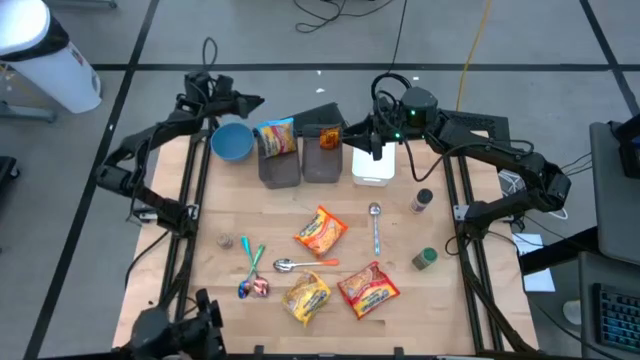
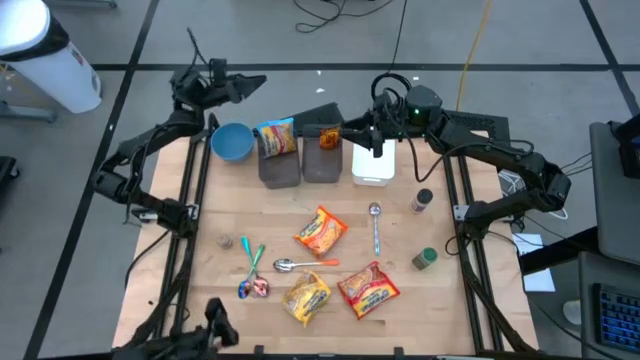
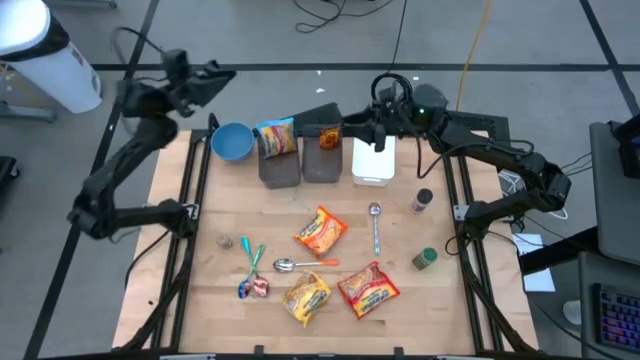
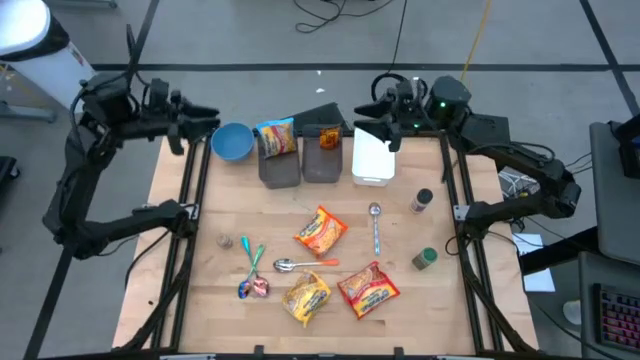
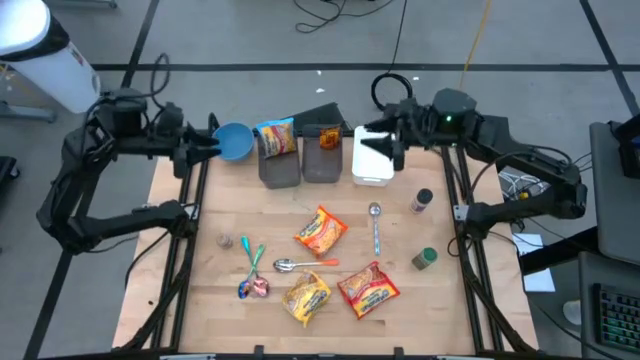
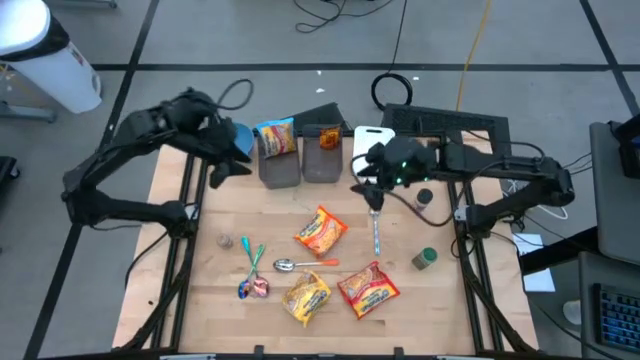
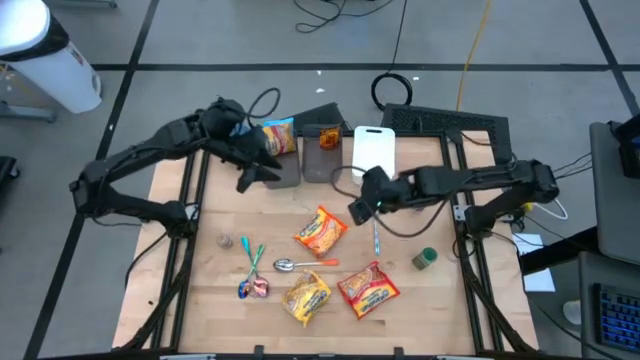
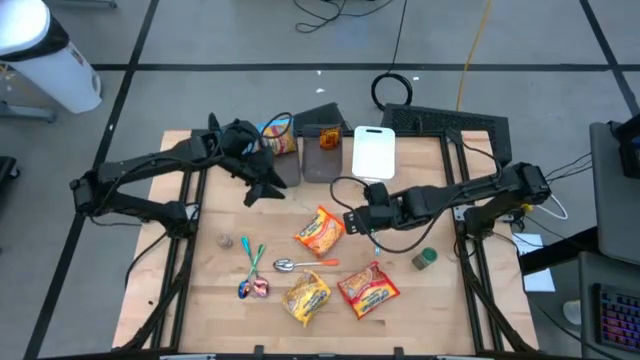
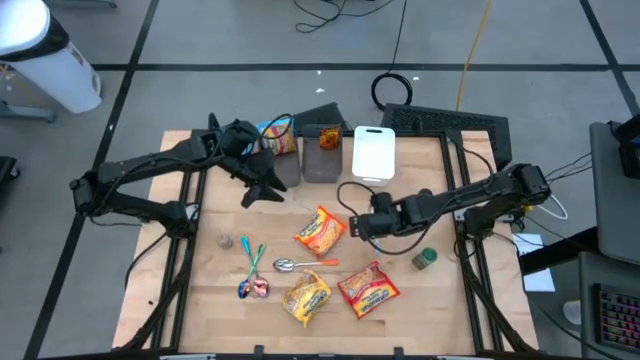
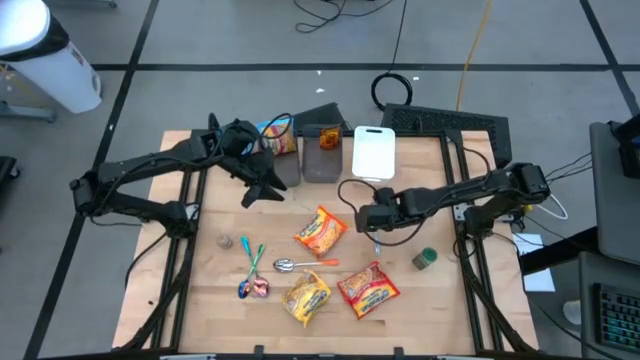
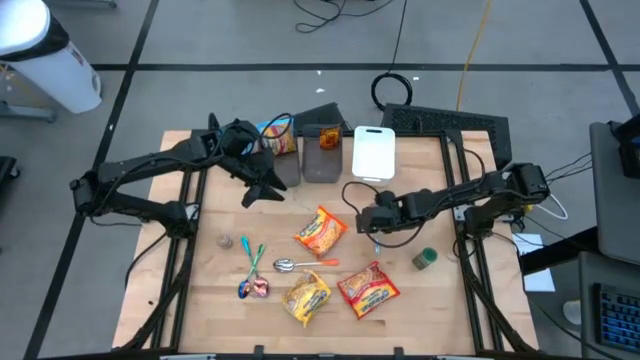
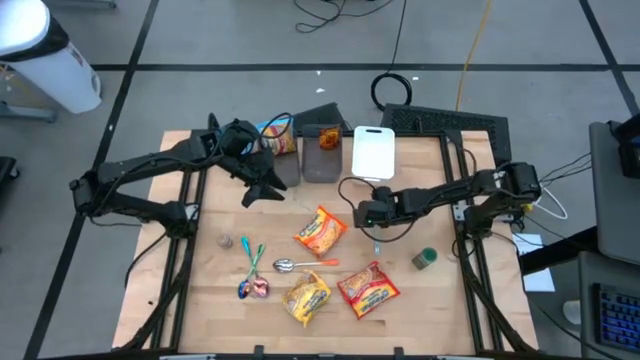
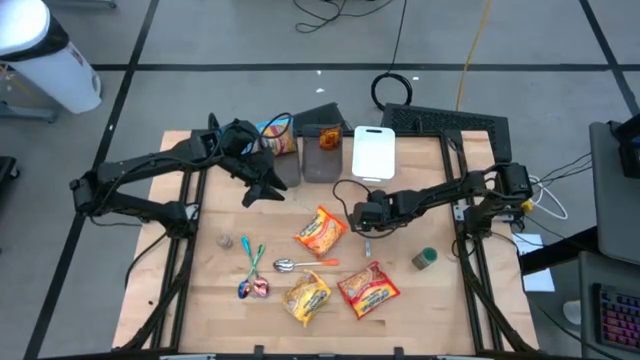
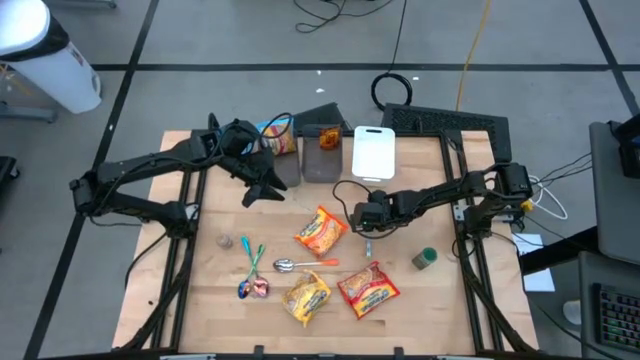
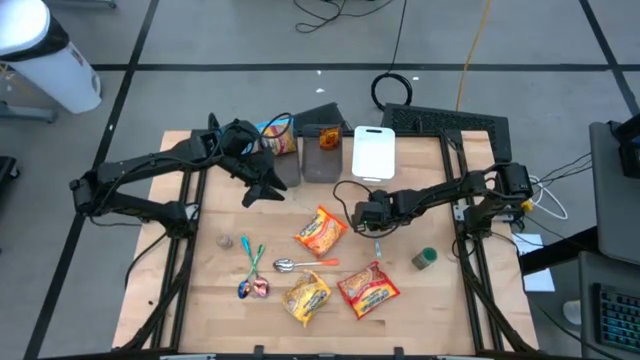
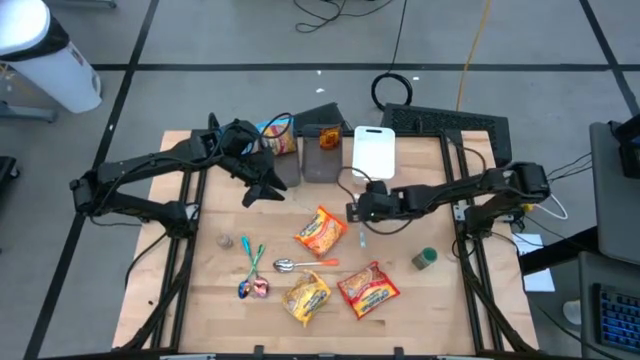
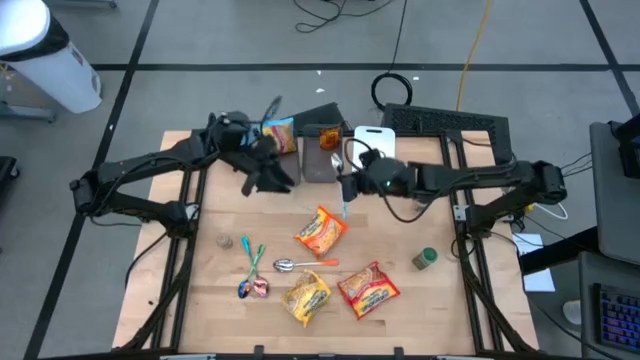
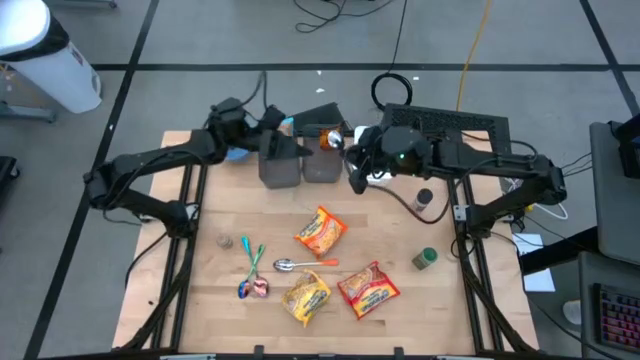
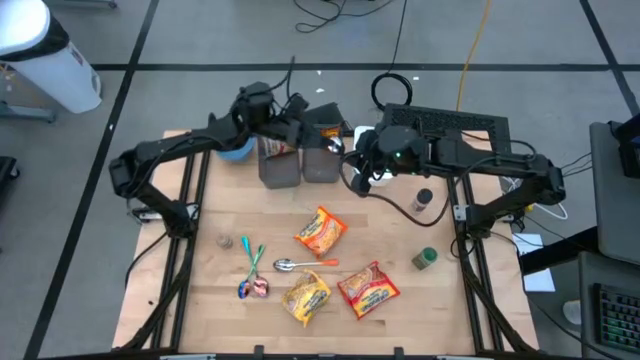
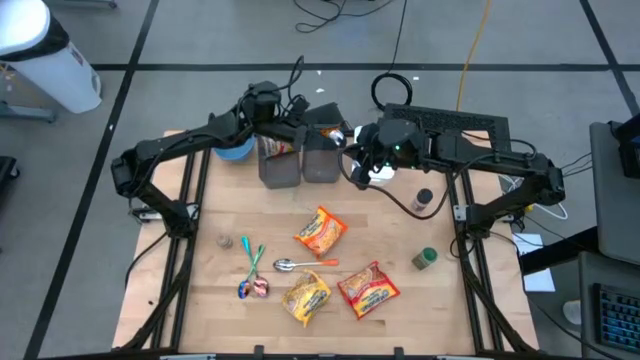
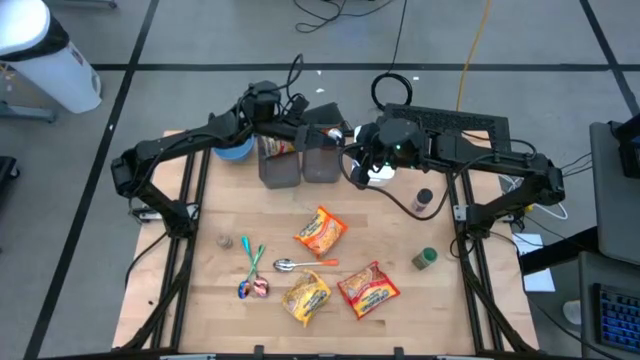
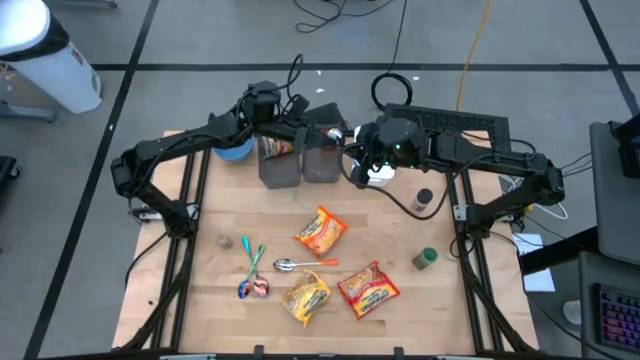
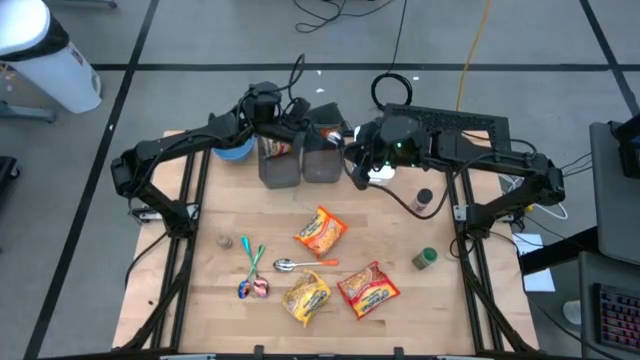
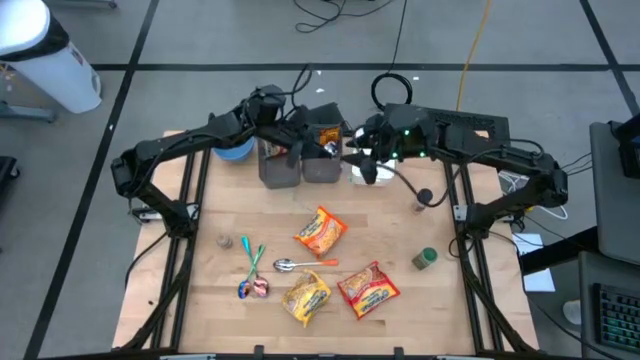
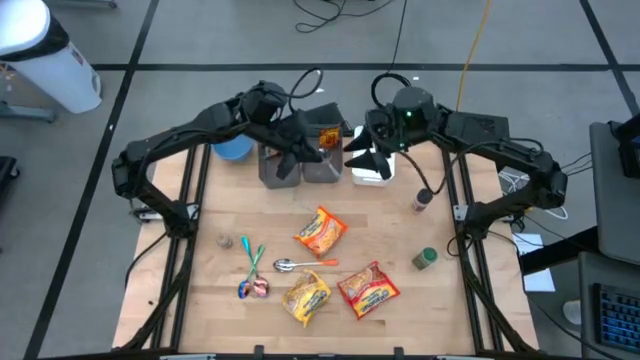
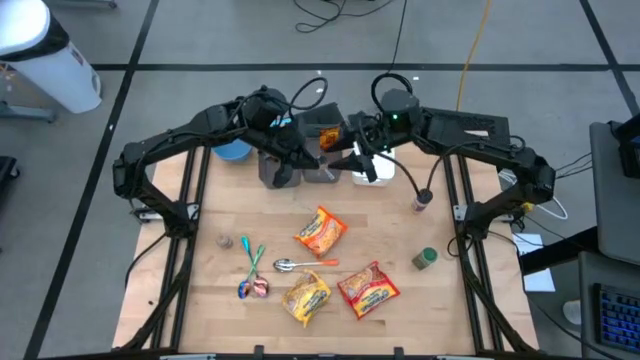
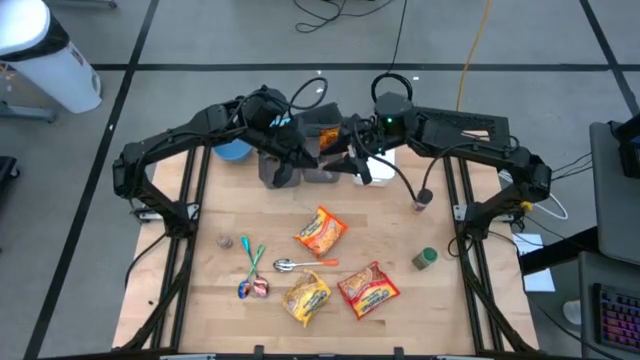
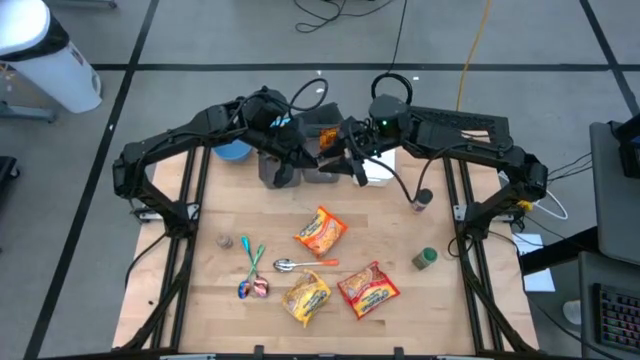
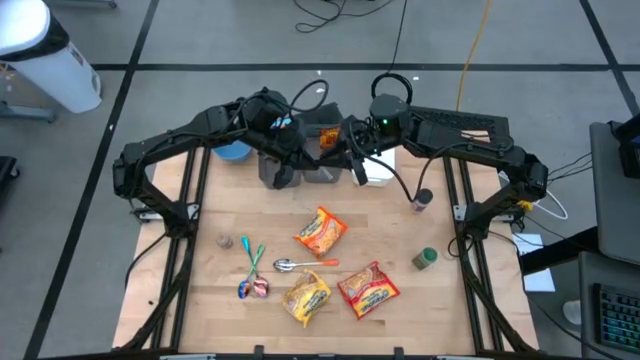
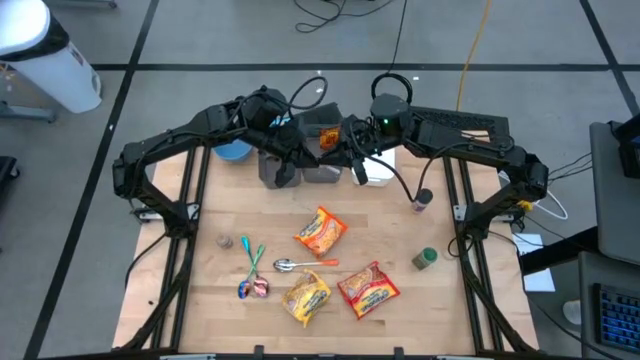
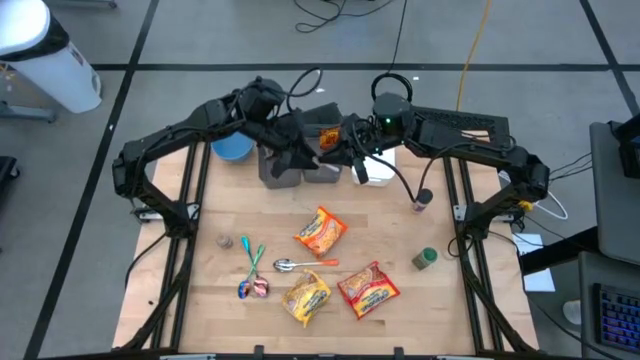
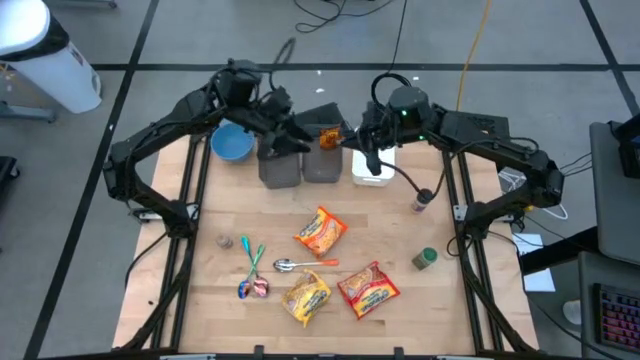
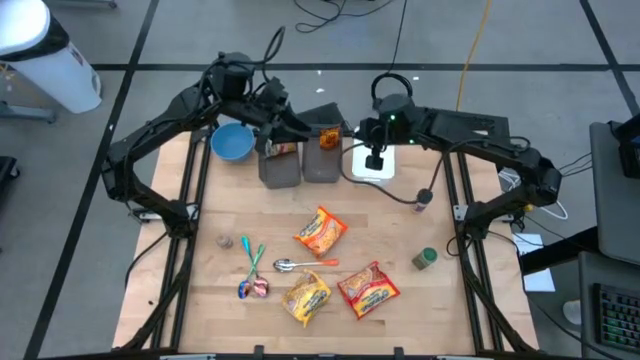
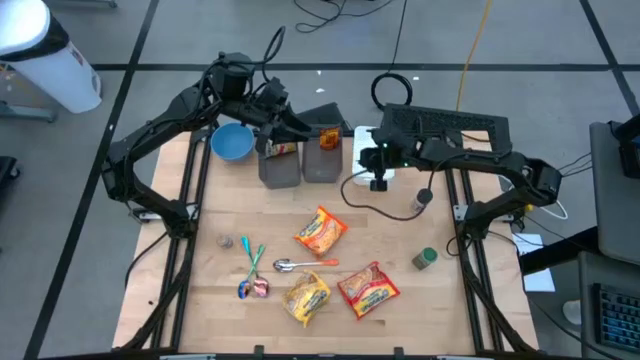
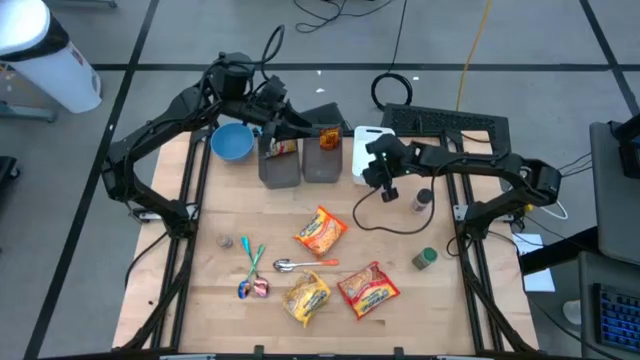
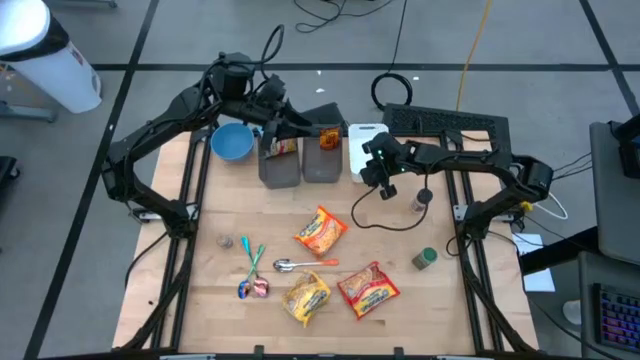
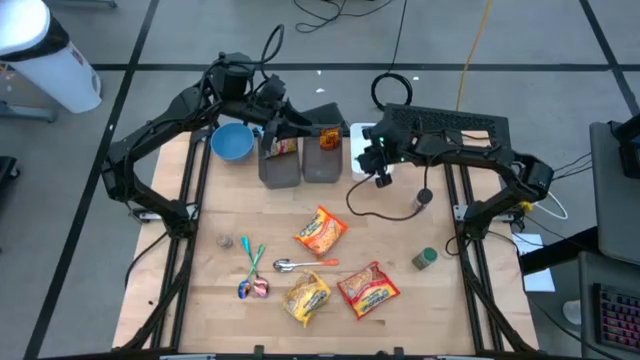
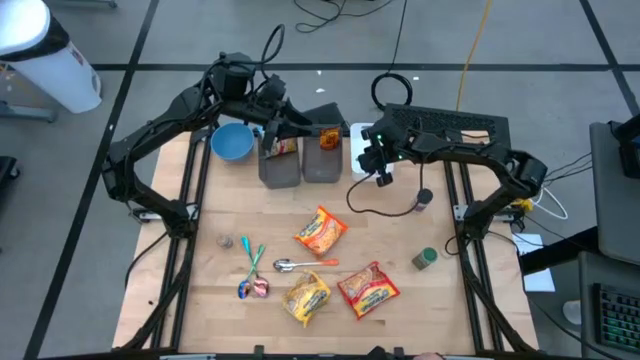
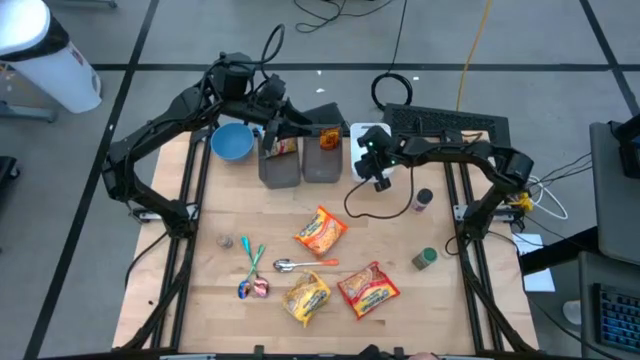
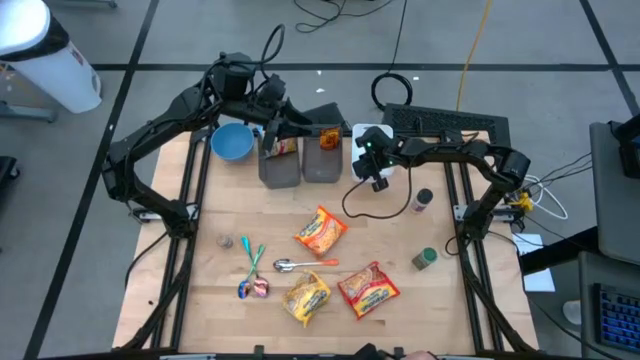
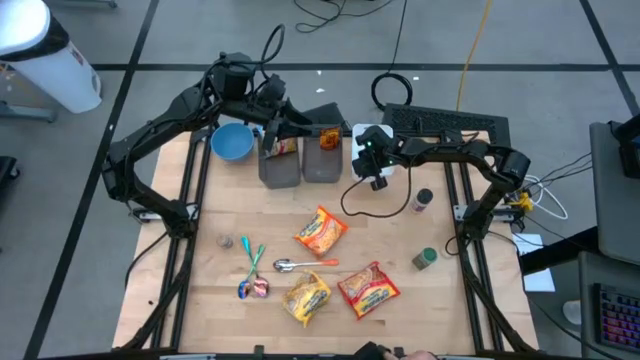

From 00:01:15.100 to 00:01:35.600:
Task: Pick & Place Food Item
Put the white blue spoon into the white bin

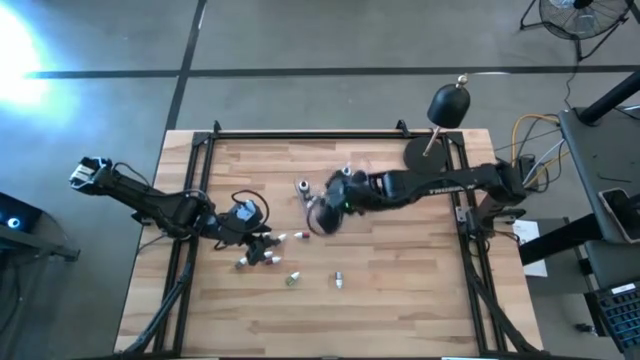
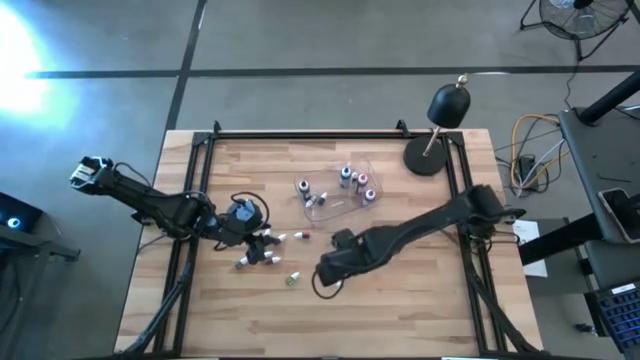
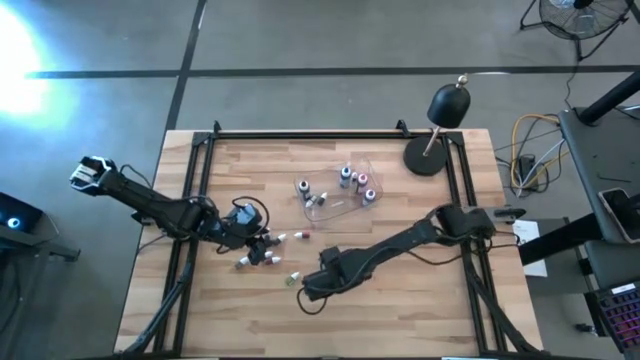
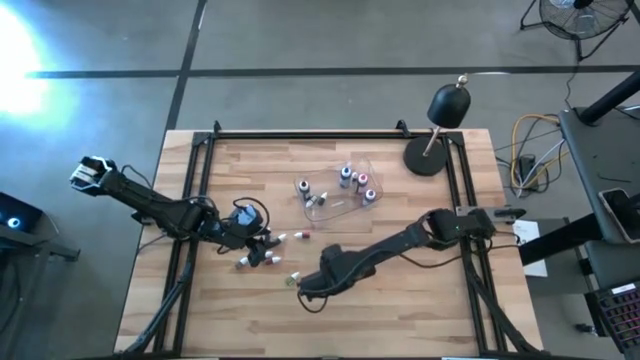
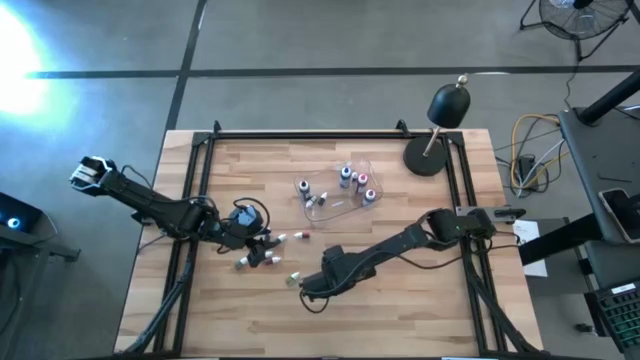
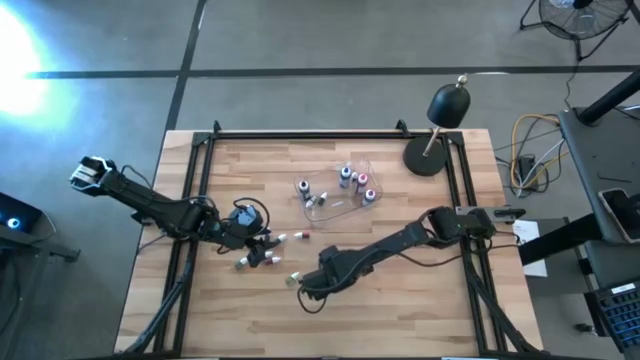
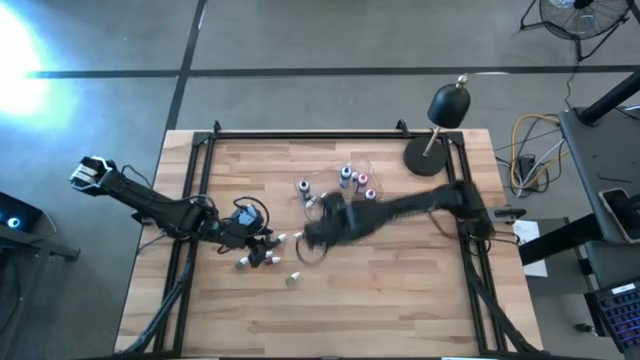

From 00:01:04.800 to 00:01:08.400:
Task: Pick & Place food coloring
Put the small violet food coloring bottle into the transparent bin
